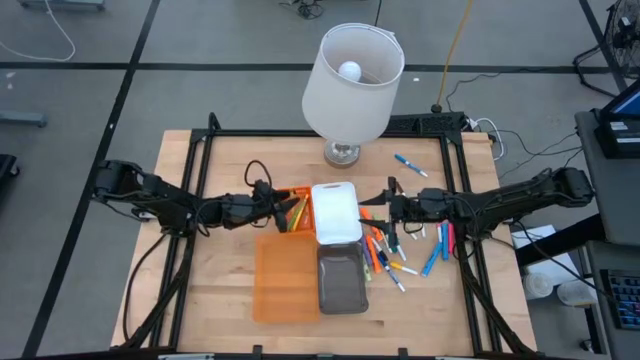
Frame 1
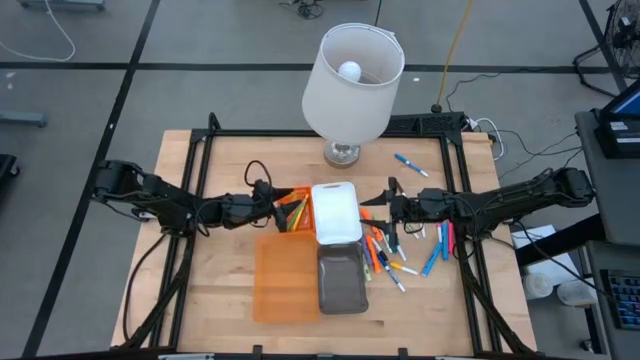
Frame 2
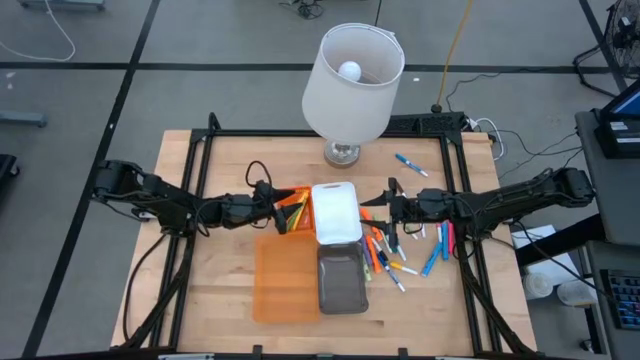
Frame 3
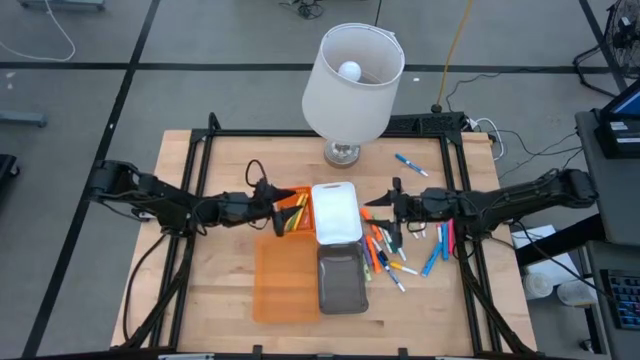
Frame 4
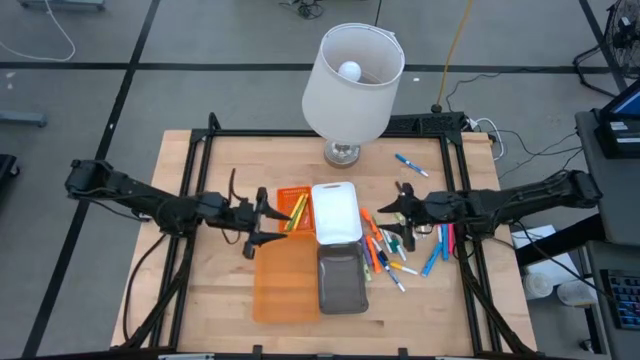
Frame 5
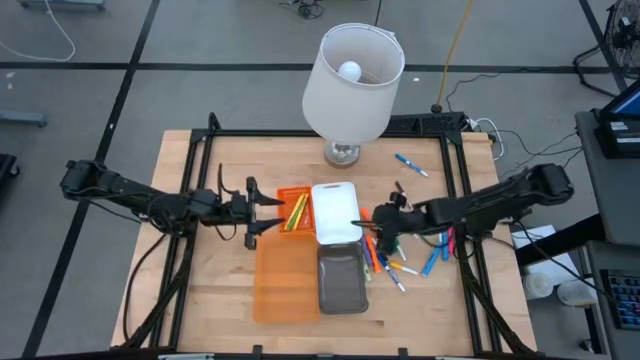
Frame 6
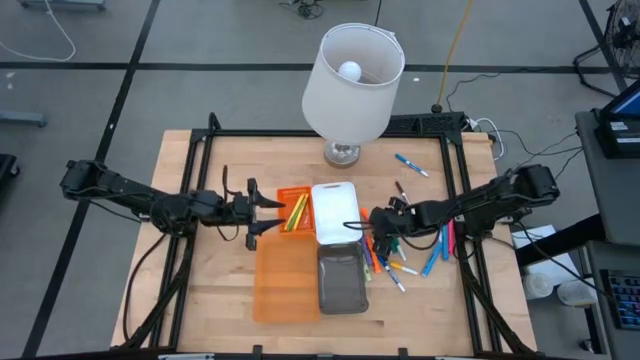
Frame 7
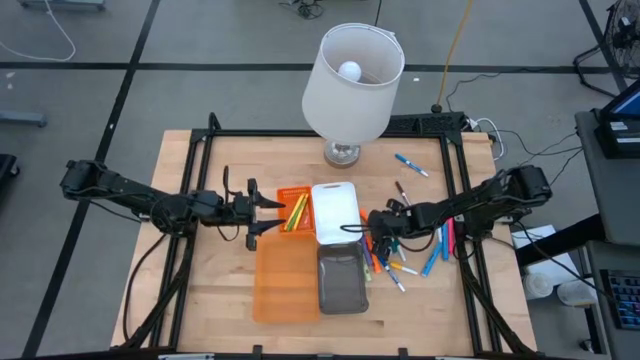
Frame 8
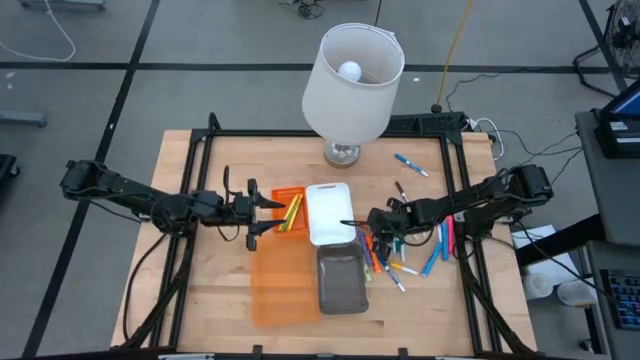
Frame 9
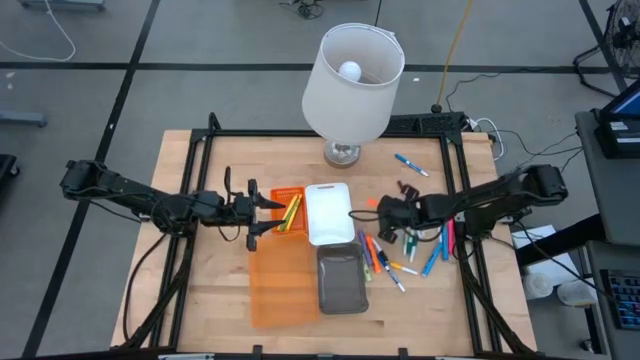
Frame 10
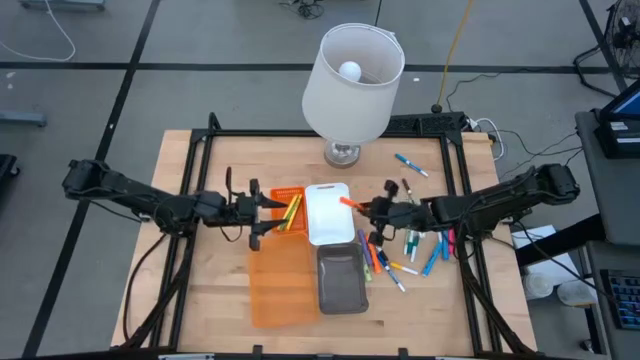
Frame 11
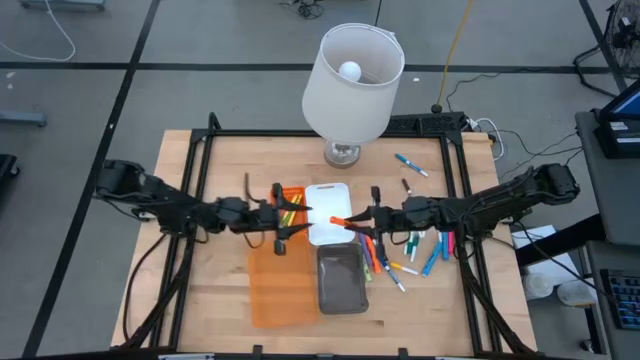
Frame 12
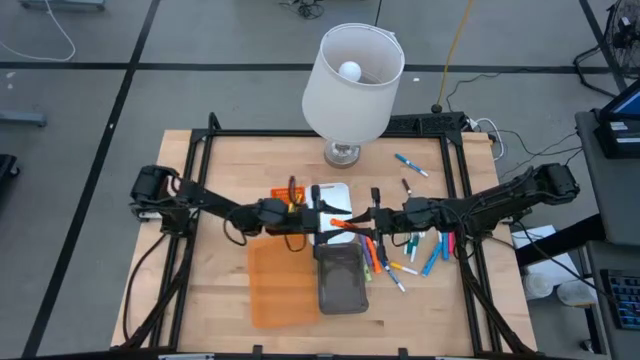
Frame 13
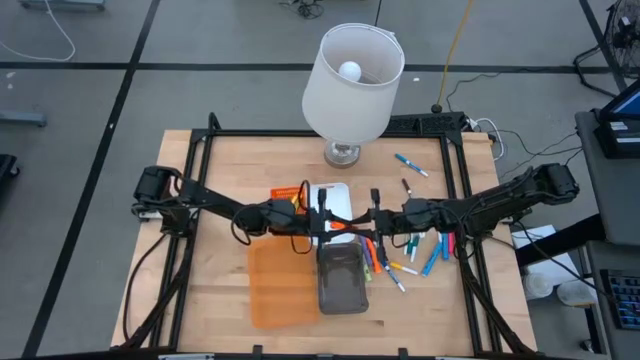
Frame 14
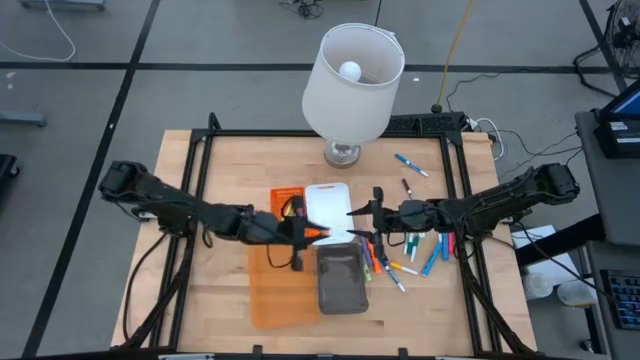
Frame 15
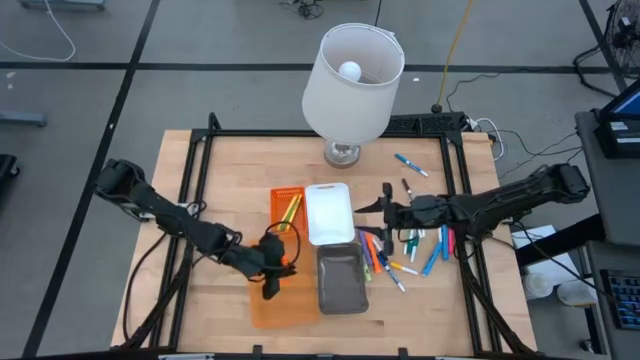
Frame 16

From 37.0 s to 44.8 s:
Task: Pick & Place Markers
Put the top orange large highlighter pen into the transparent orange bin

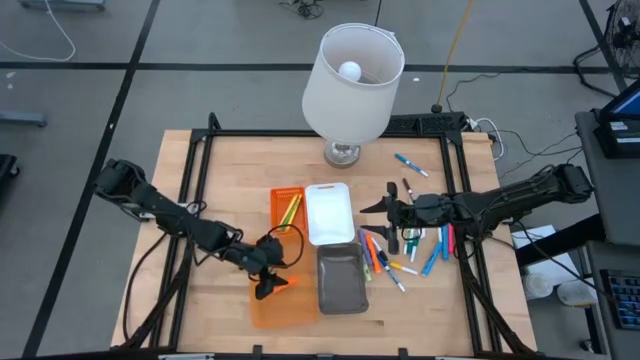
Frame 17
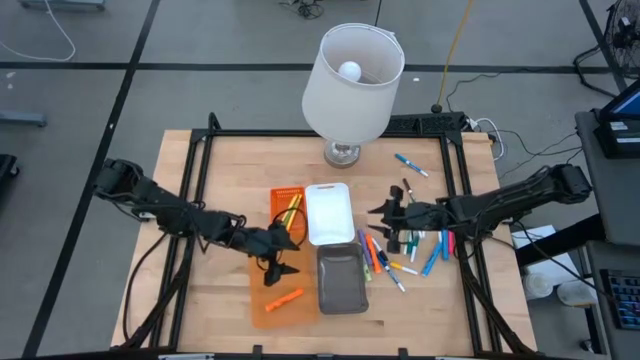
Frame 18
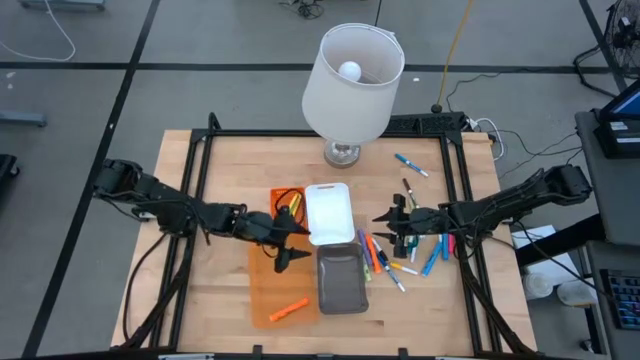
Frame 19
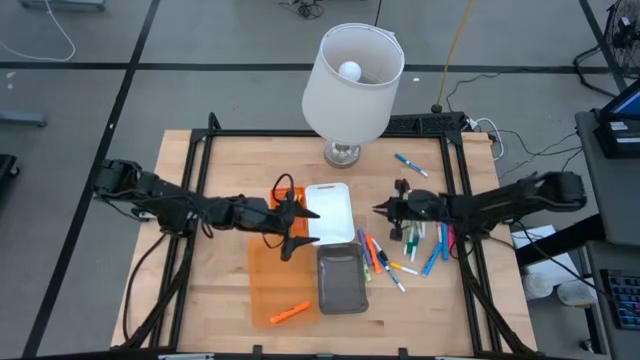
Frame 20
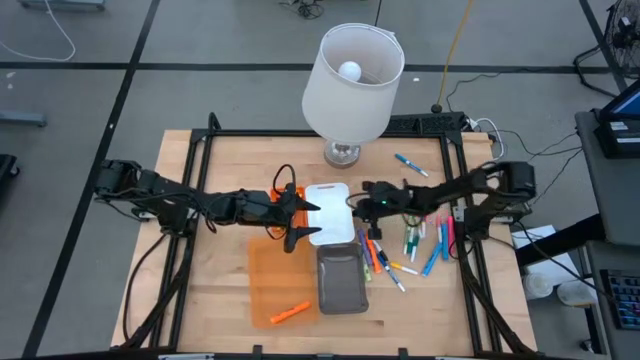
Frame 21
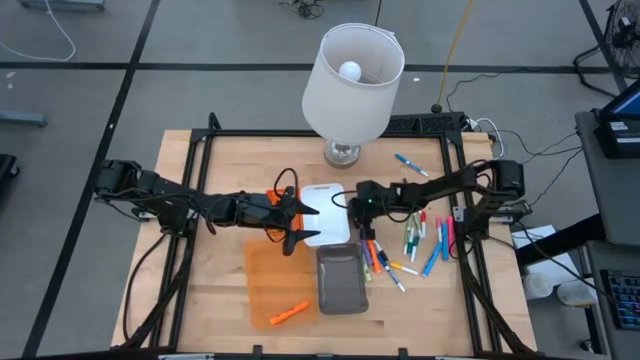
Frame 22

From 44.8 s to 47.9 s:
Move the black small highlighter pen

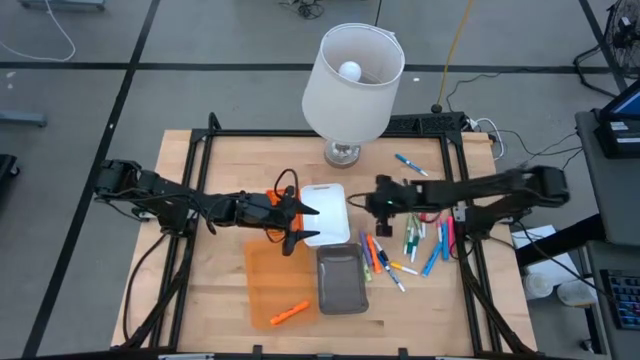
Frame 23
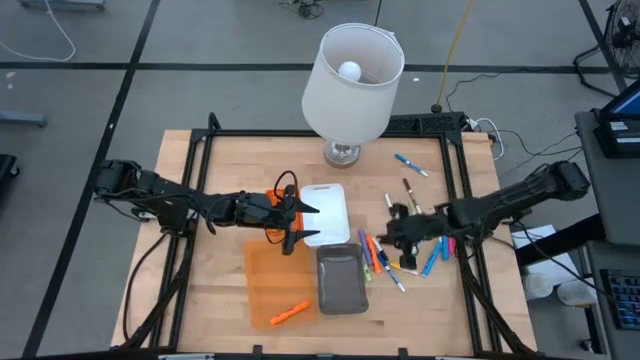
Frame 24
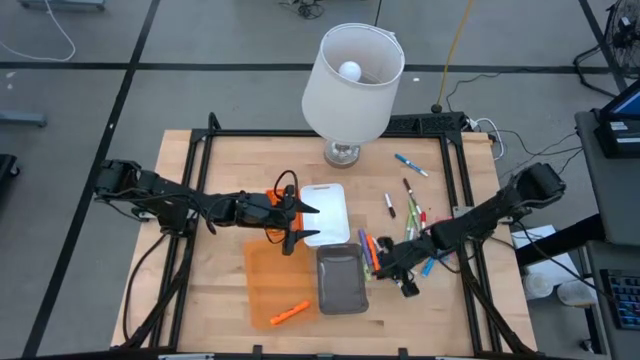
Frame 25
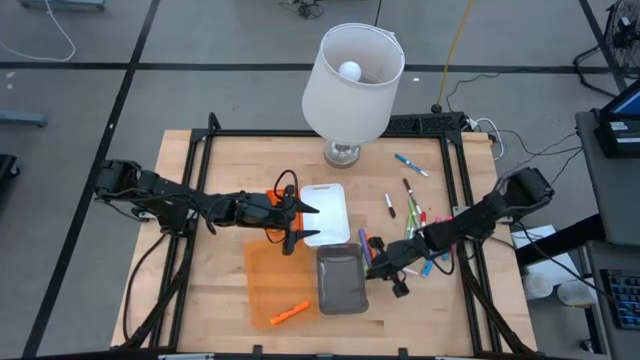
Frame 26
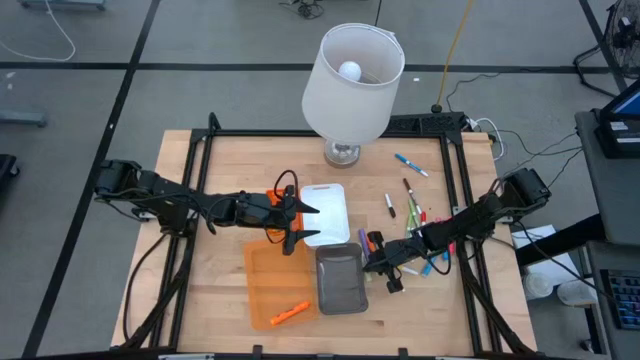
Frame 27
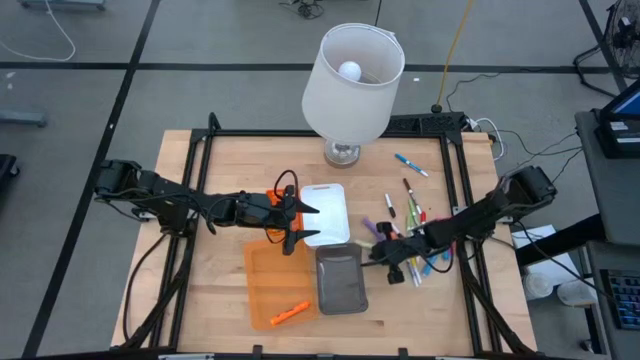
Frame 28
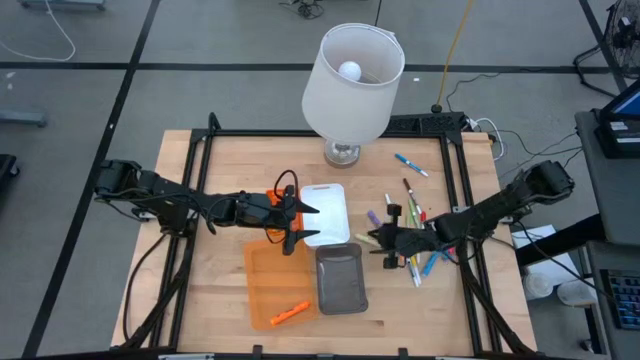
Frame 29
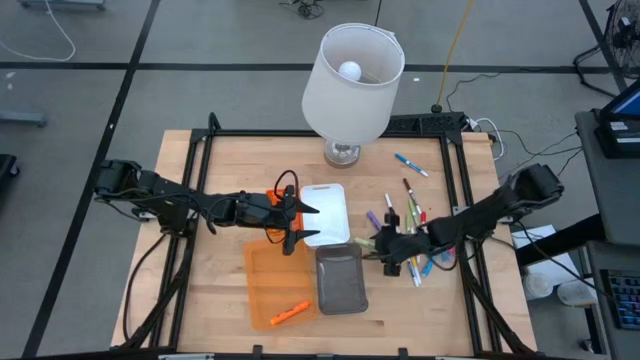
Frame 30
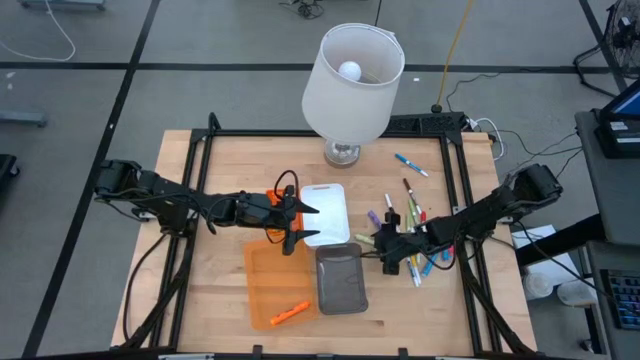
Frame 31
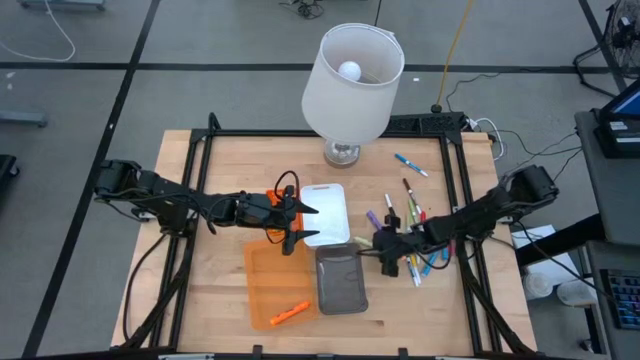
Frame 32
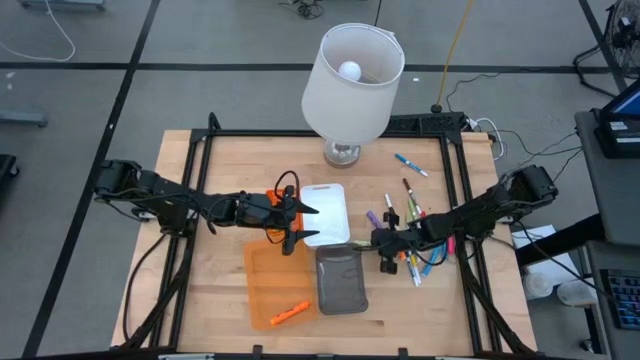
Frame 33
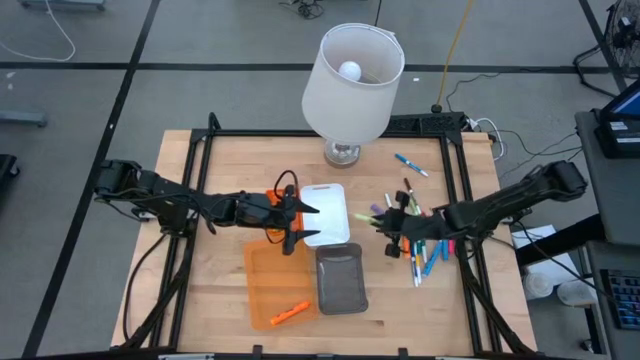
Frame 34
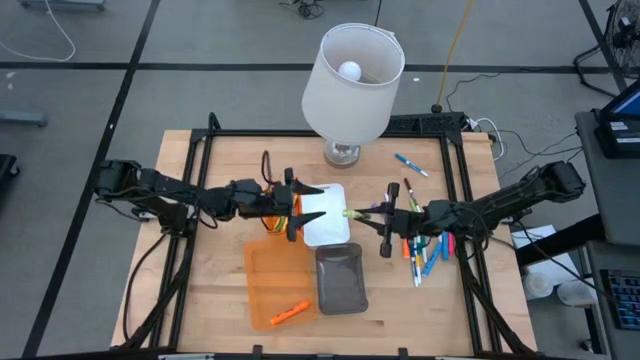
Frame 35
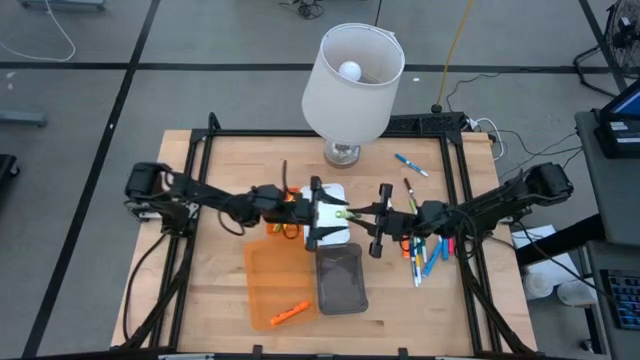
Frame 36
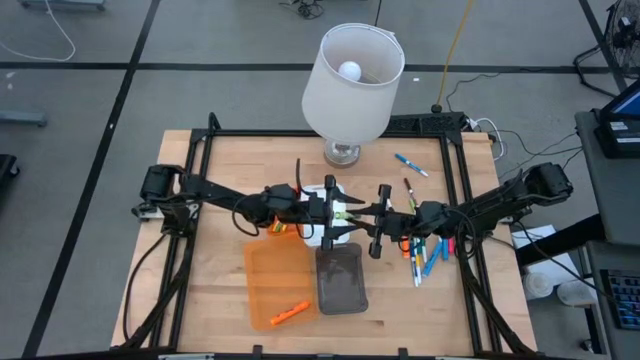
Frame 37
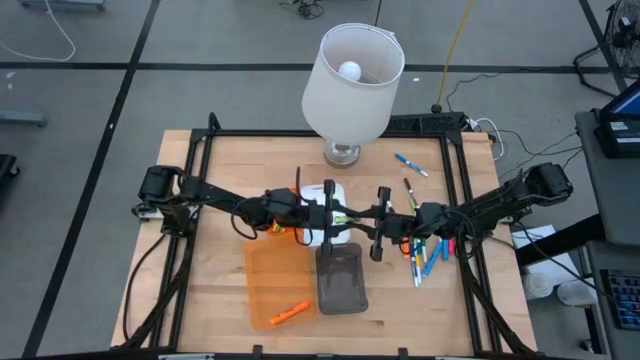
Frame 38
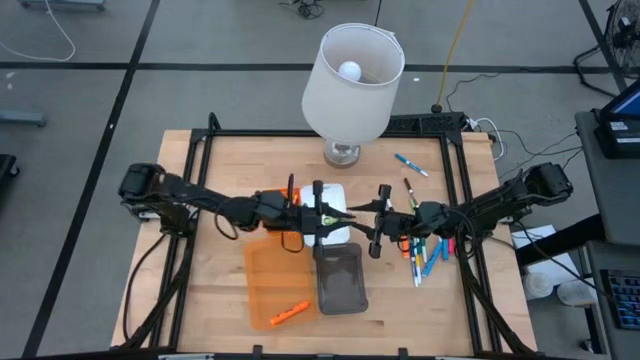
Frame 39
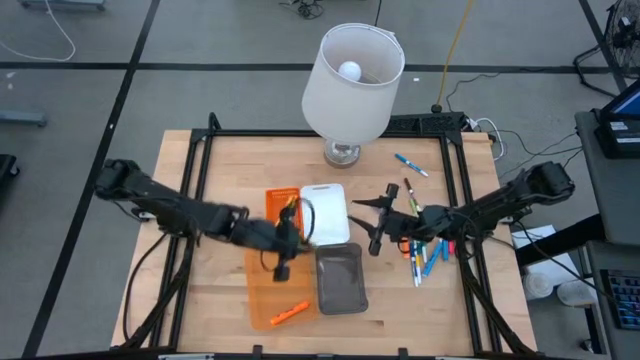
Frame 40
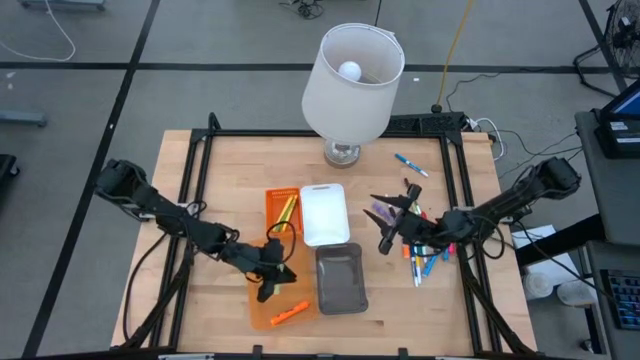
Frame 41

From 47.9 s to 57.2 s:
Put the light green large highlighter pen into the transparent orange bin

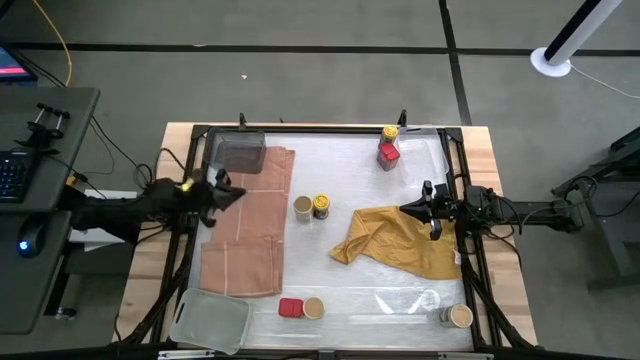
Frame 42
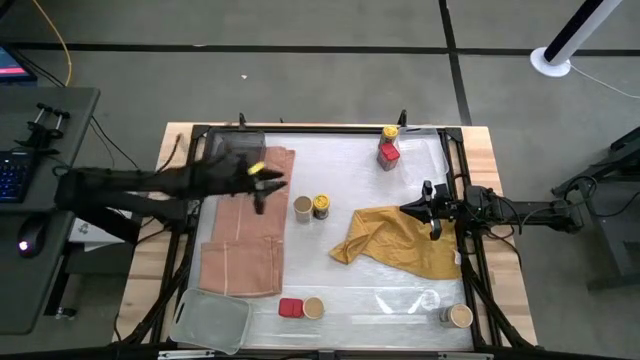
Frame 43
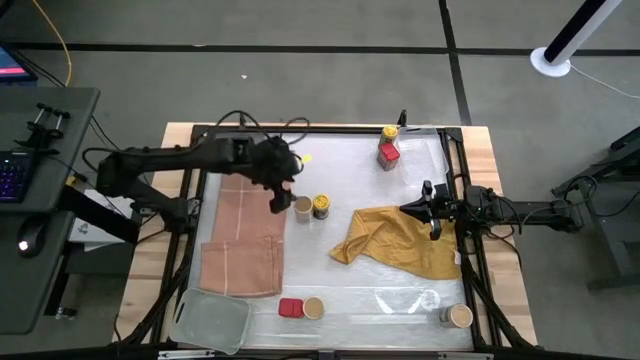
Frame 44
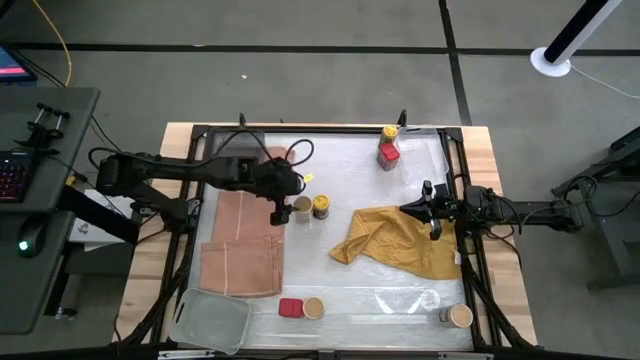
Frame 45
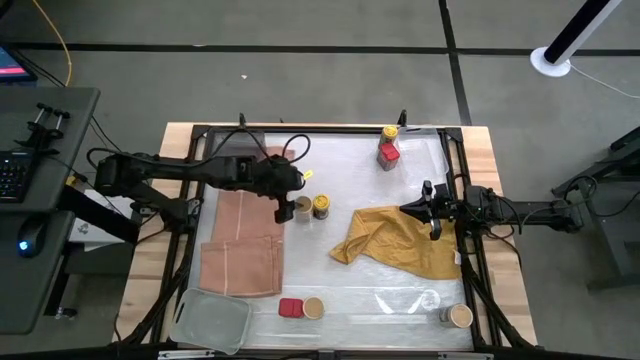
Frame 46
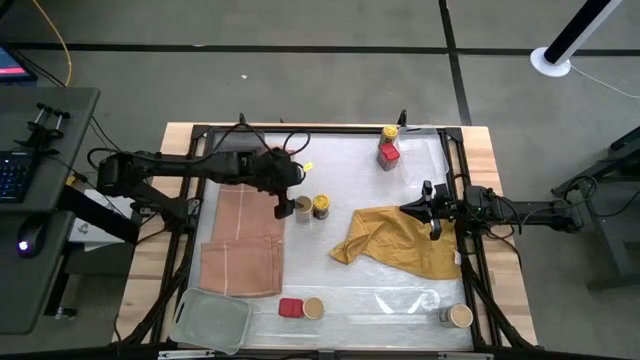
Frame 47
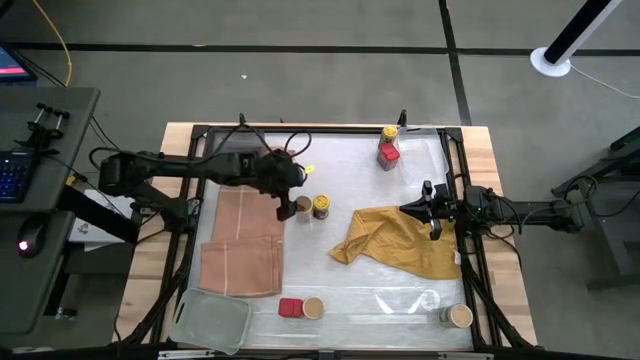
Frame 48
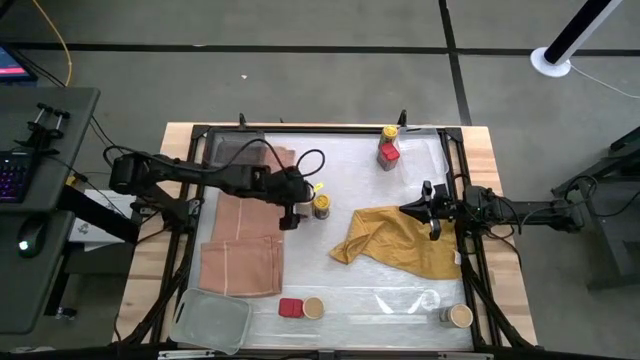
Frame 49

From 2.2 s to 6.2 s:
Task: Sort spices by type
Put the top gold seasoning bottle into the transparent bin
